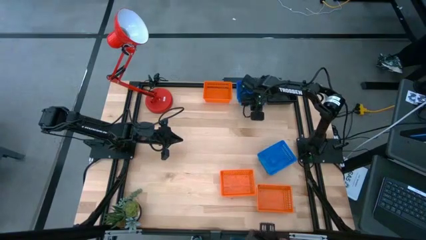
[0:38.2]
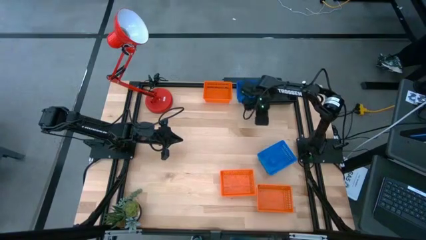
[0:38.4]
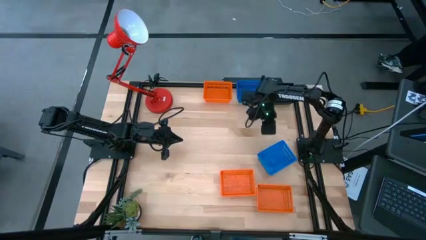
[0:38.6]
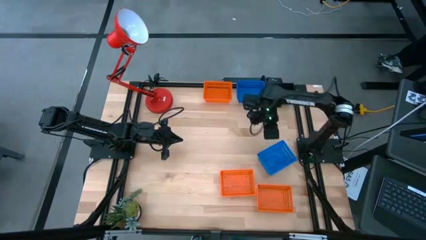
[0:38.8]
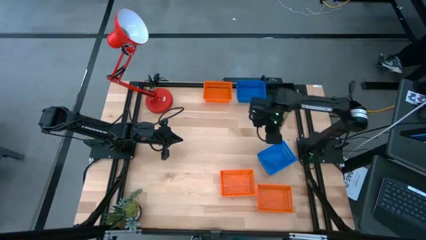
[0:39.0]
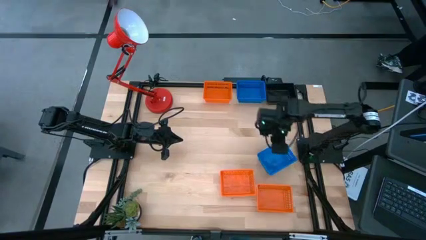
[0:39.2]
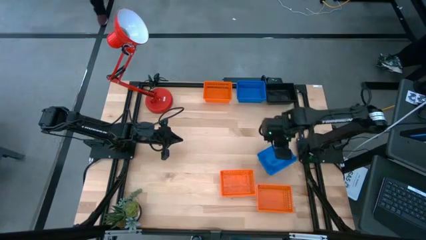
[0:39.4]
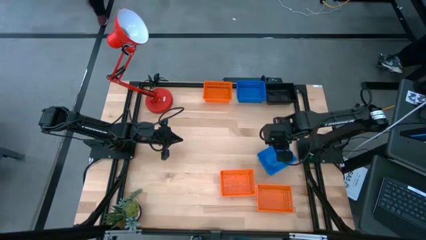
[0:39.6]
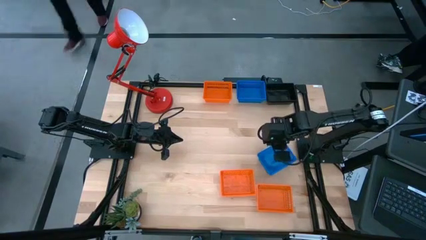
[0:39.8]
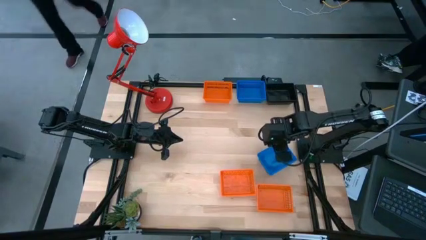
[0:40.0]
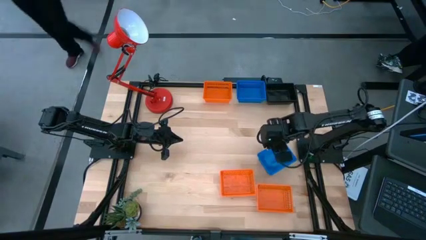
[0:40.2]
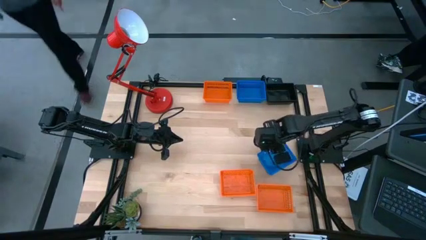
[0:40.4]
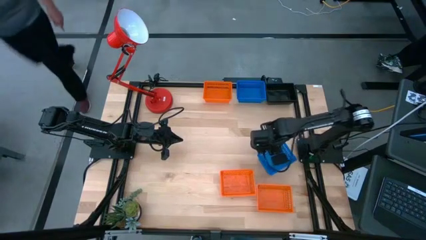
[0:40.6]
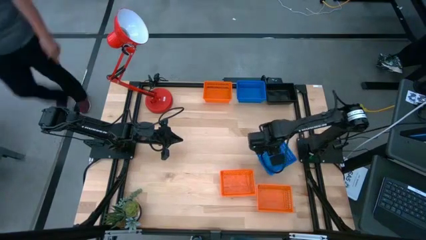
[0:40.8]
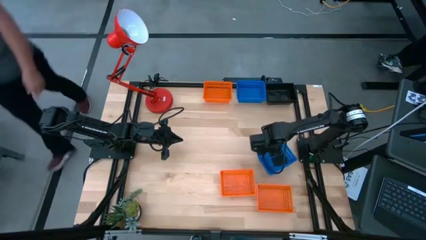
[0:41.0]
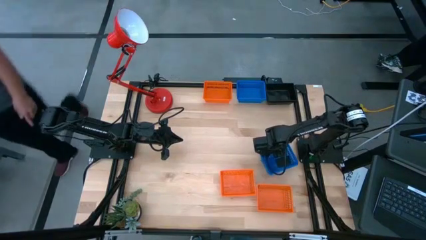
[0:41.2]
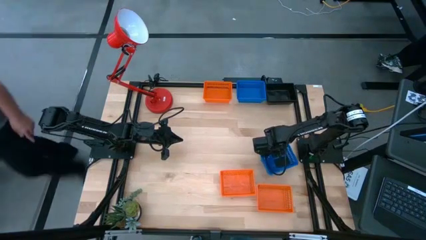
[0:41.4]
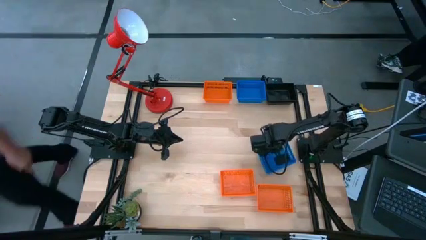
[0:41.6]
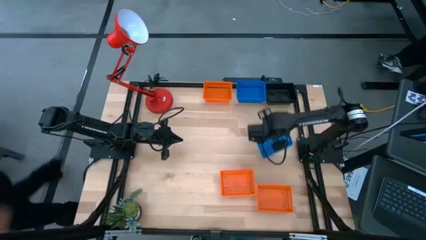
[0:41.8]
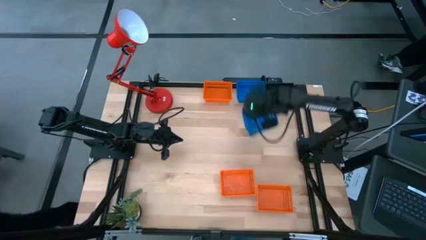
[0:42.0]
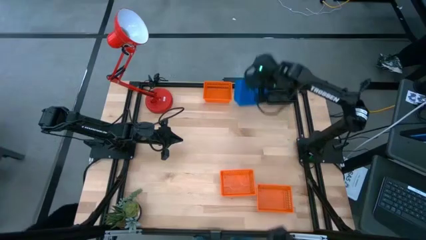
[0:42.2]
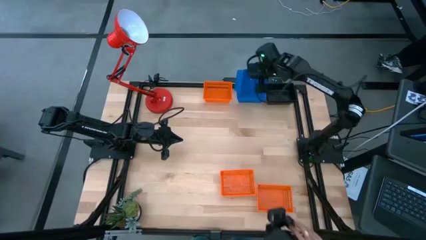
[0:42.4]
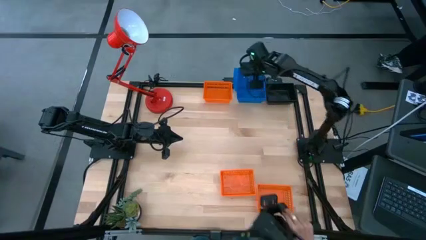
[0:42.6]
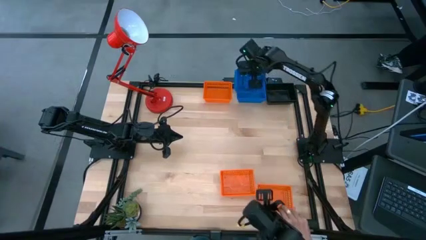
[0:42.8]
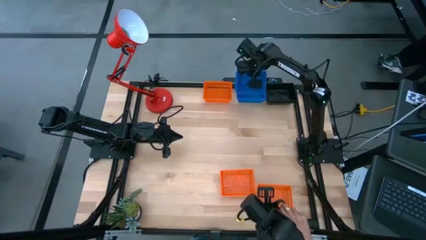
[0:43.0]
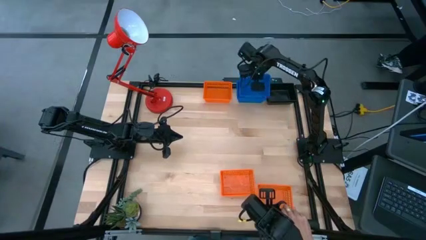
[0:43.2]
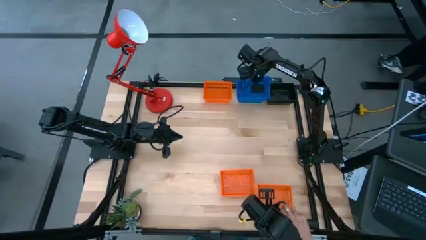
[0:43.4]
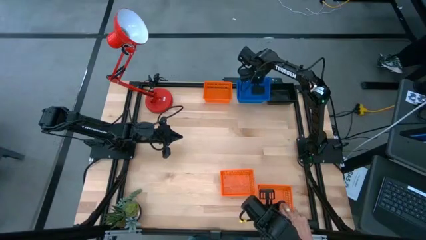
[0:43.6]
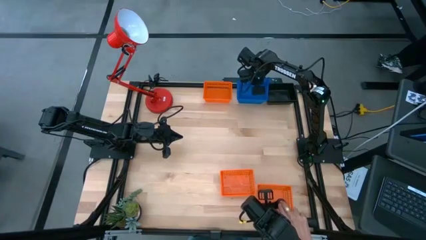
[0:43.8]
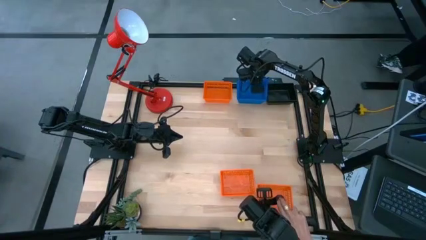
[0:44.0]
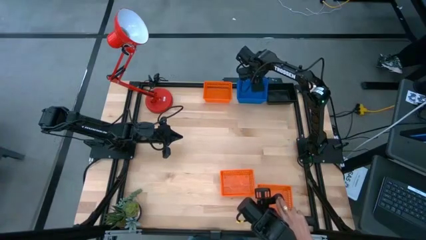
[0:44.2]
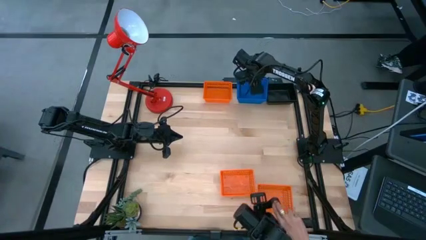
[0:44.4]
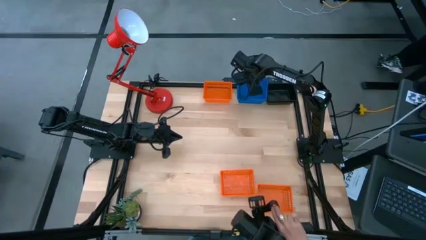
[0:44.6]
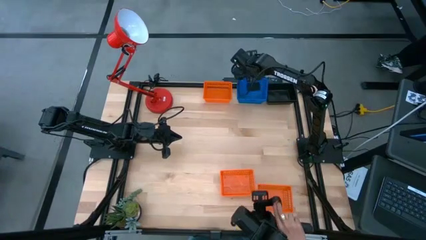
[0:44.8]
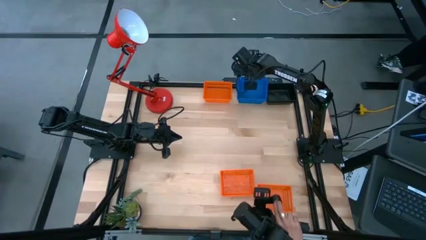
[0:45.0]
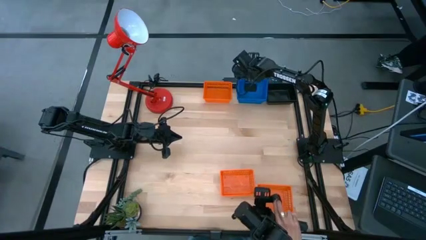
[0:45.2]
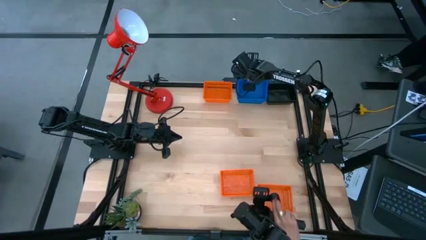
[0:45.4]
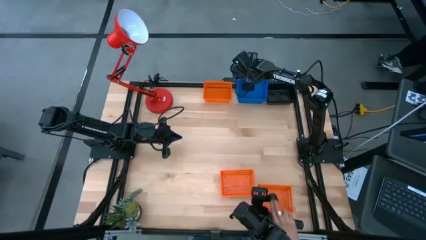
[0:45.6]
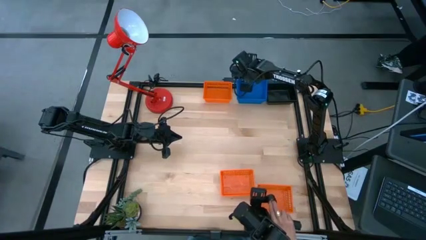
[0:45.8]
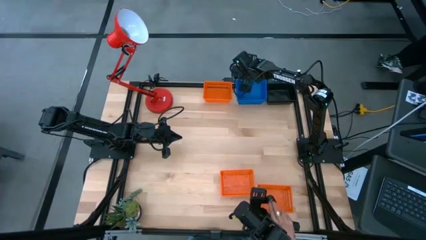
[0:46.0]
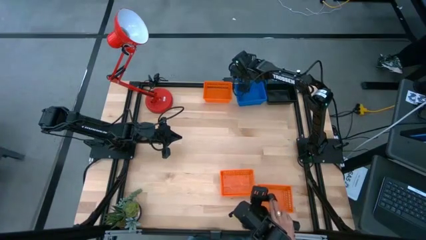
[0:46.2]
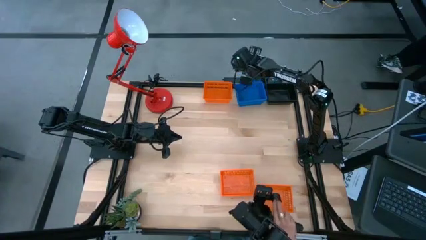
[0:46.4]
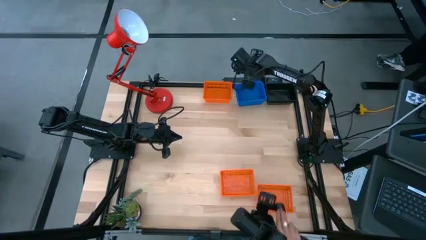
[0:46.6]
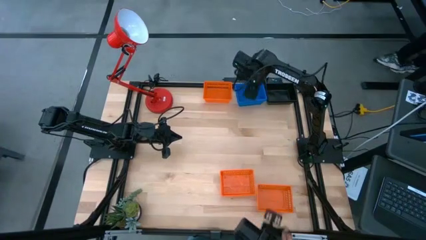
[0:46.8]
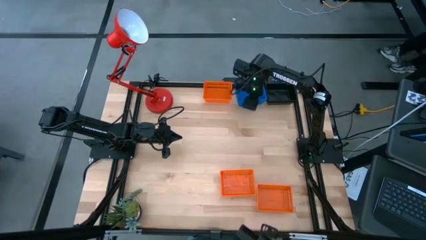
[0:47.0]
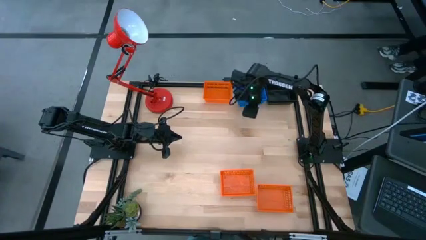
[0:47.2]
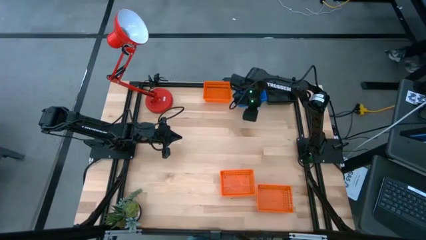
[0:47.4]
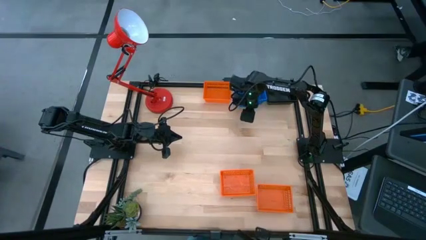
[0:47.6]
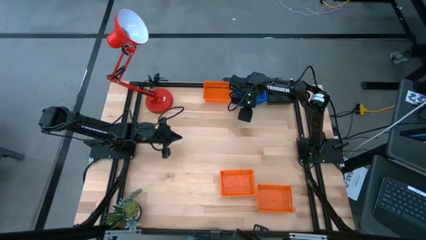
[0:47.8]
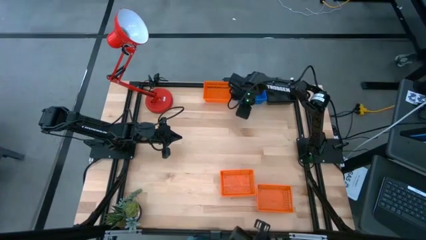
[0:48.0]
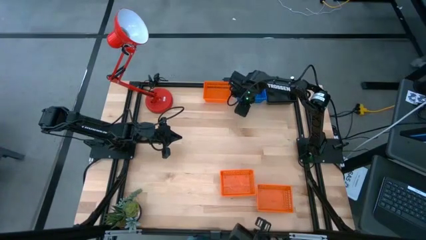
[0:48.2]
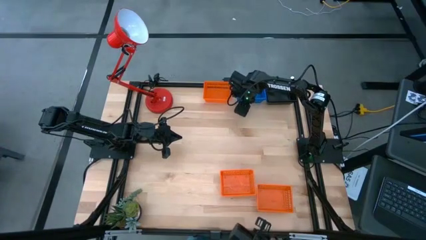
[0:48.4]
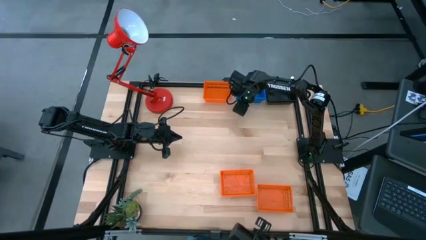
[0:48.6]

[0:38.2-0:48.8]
Stack the bottom blue bin on the top blue bins

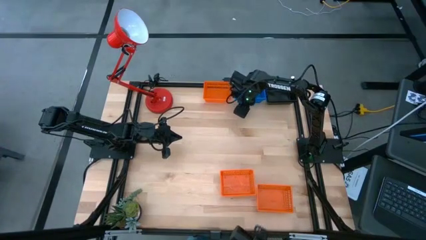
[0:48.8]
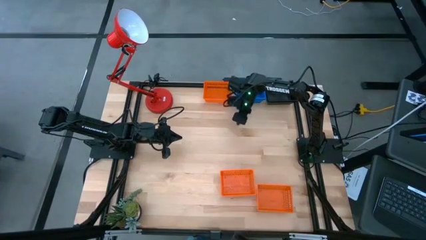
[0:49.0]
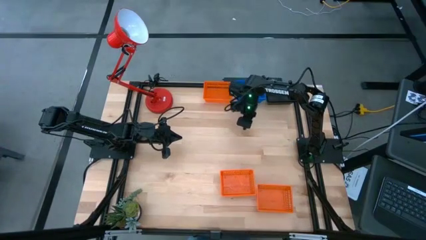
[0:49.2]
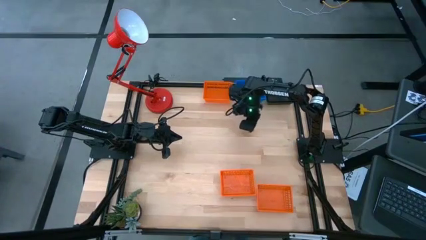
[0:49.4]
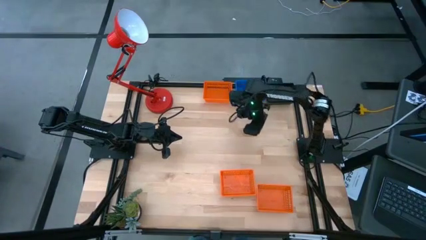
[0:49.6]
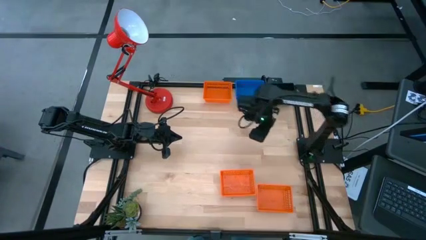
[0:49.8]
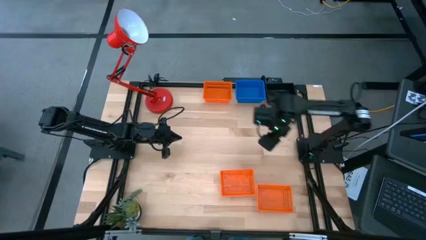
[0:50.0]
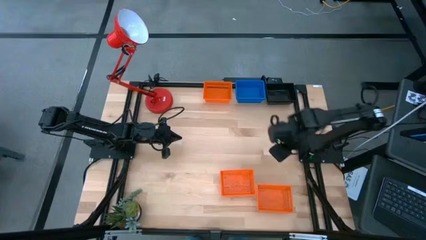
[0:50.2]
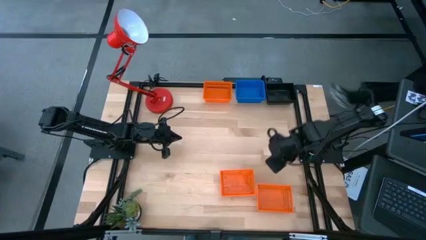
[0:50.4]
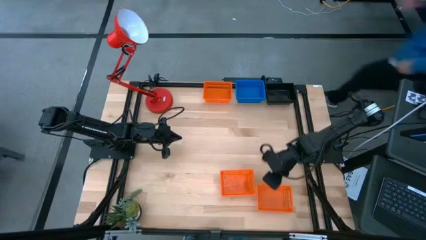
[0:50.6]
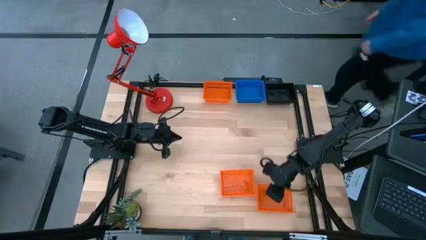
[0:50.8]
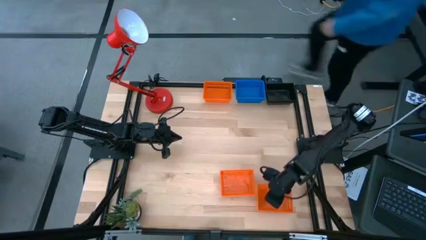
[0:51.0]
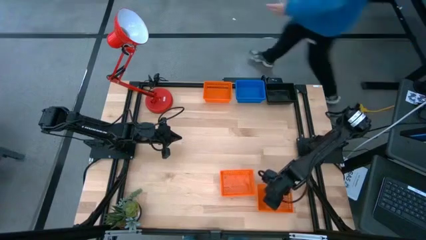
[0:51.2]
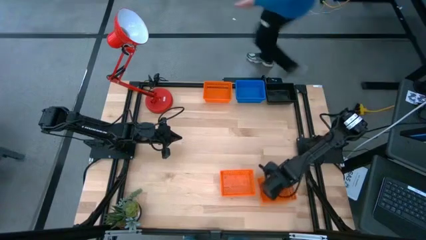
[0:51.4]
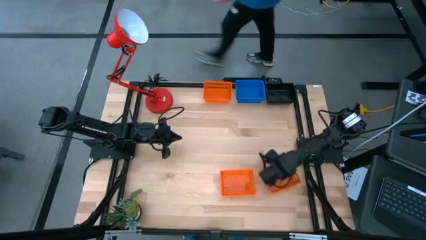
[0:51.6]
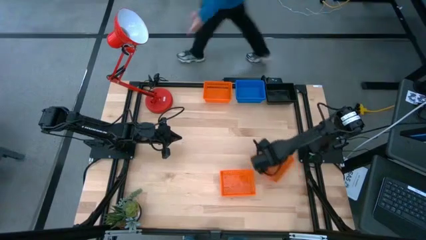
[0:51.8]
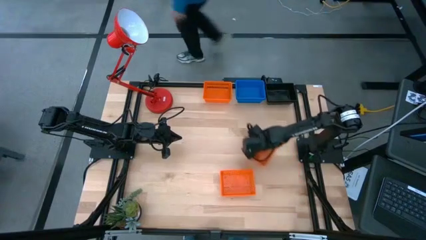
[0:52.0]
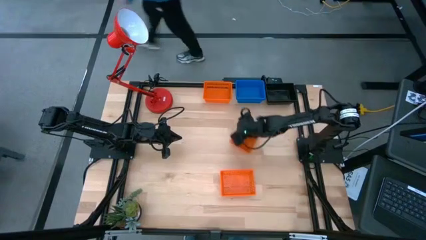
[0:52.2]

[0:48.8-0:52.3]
Move the bottom right orange bin to the top of the table

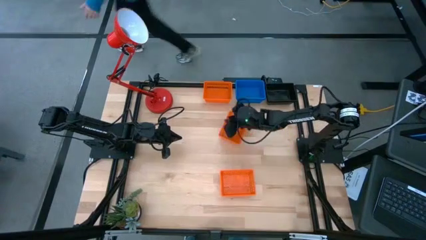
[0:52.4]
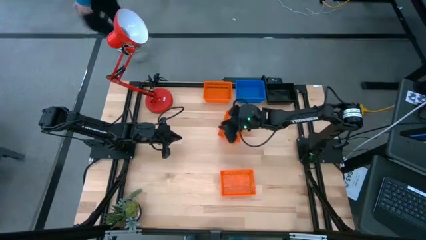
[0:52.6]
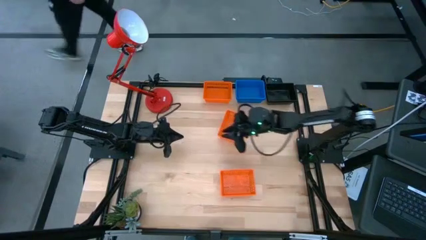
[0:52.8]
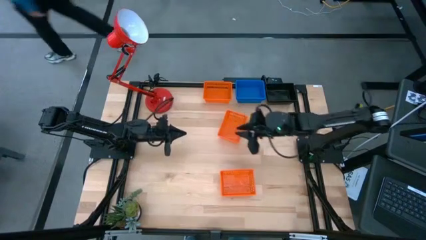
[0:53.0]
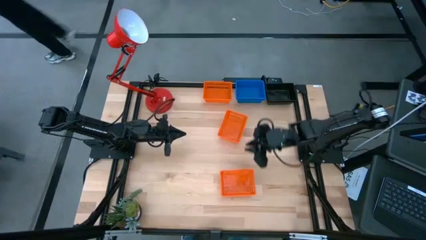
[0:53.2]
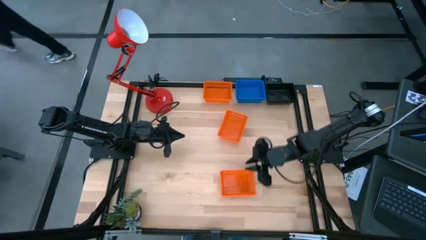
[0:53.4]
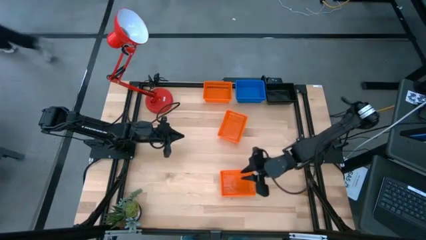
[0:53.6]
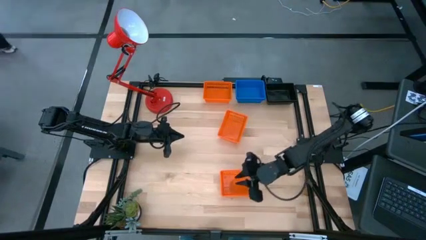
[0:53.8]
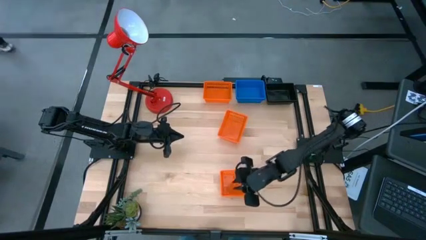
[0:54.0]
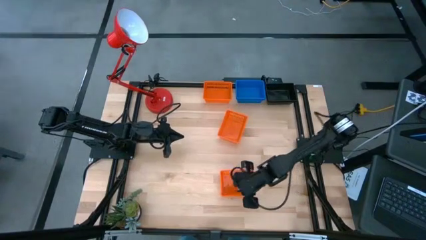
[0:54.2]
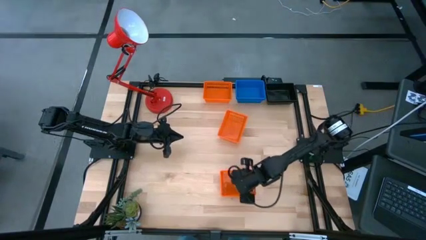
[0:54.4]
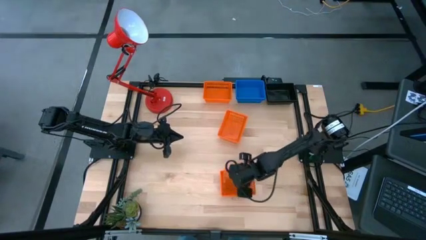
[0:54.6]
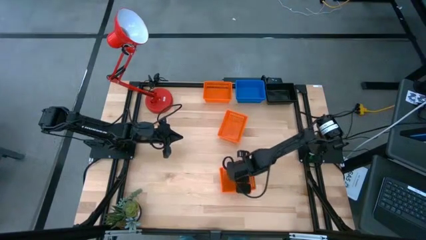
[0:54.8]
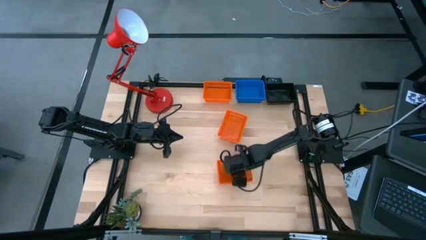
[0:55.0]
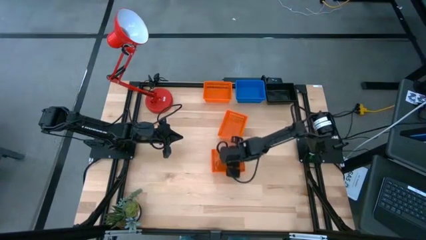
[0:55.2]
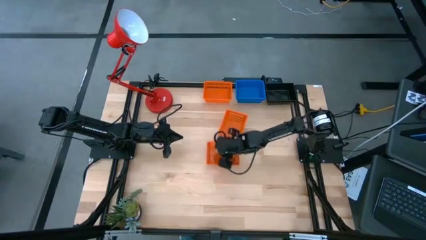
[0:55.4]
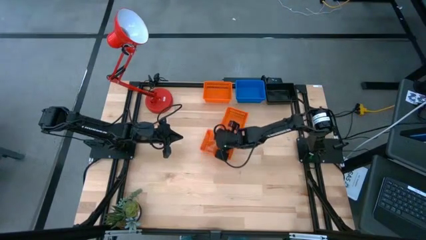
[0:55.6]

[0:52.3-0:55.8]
Move the bottom orange bin to the top of the table
